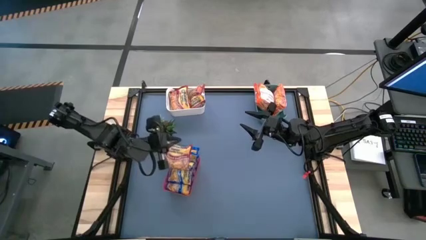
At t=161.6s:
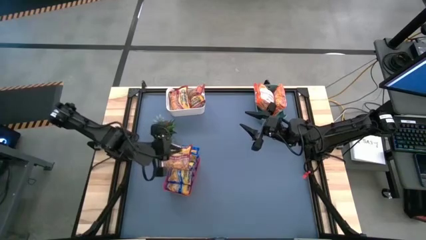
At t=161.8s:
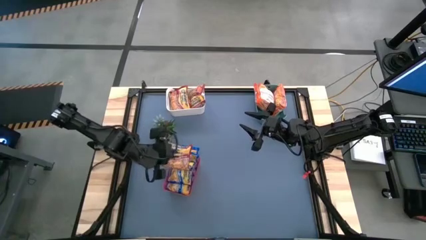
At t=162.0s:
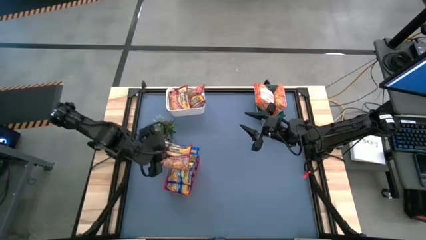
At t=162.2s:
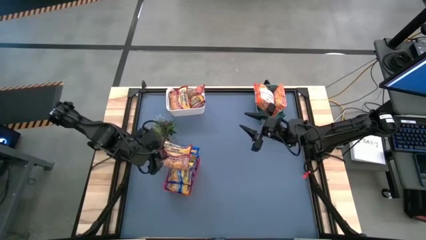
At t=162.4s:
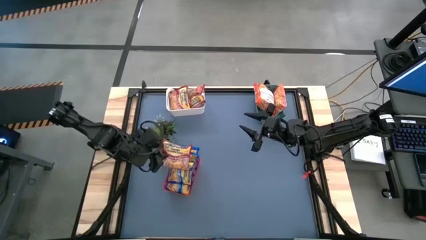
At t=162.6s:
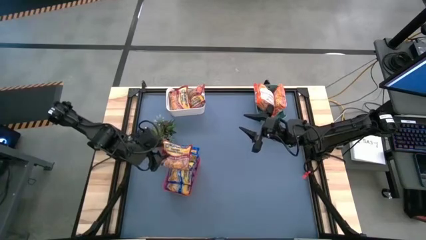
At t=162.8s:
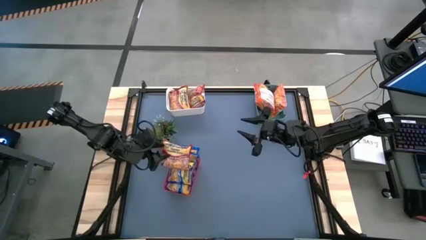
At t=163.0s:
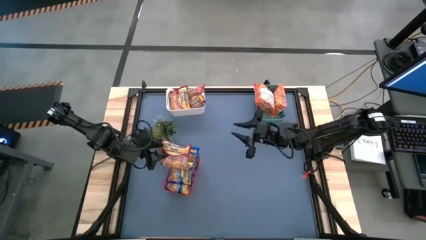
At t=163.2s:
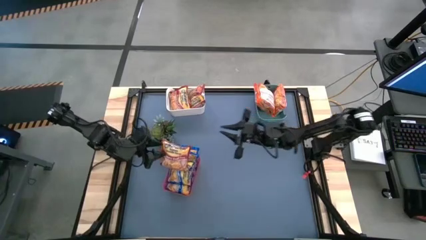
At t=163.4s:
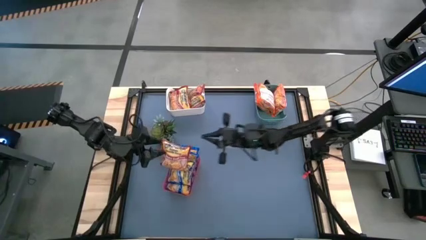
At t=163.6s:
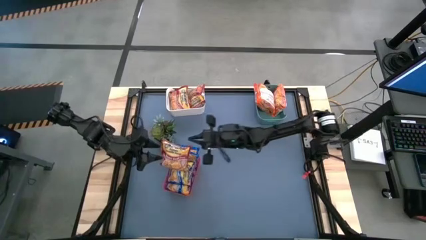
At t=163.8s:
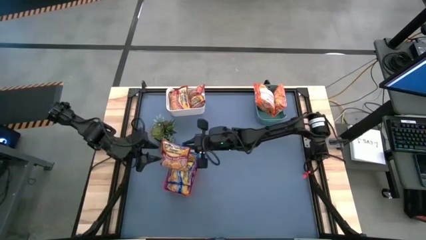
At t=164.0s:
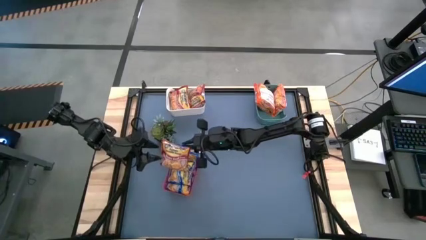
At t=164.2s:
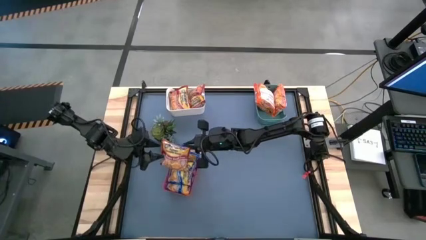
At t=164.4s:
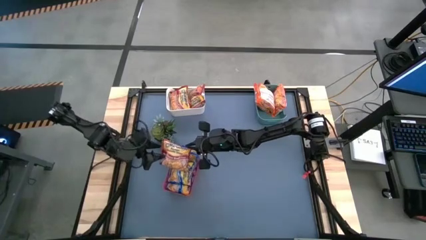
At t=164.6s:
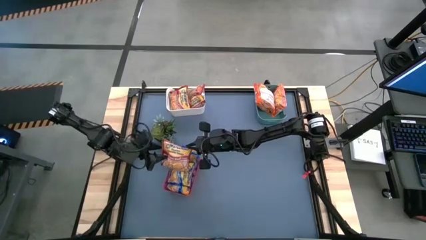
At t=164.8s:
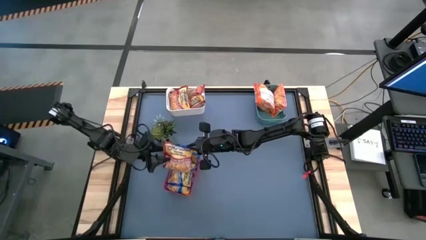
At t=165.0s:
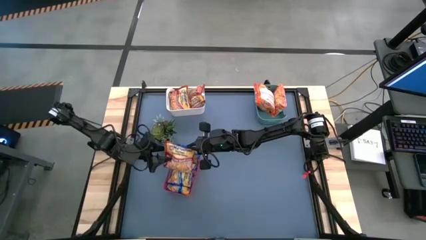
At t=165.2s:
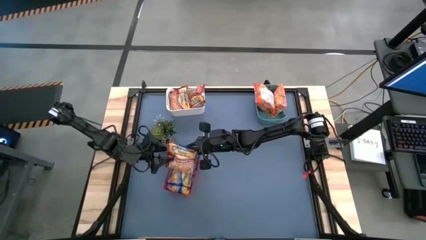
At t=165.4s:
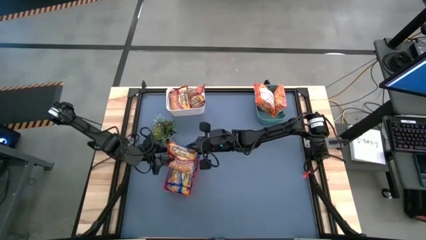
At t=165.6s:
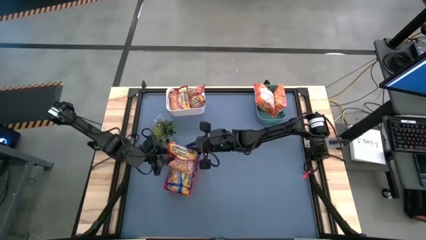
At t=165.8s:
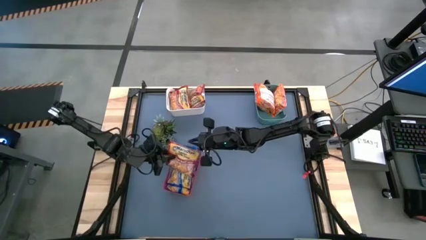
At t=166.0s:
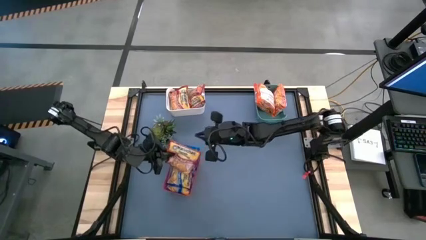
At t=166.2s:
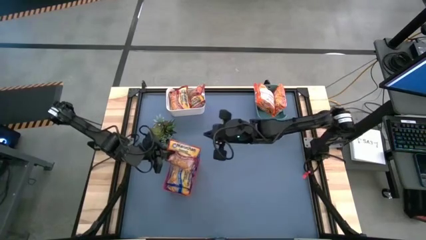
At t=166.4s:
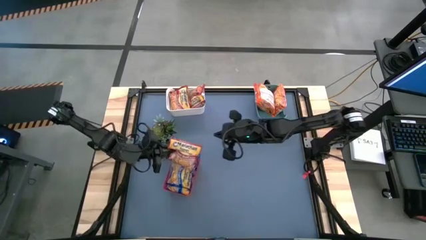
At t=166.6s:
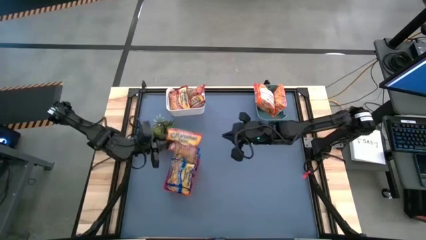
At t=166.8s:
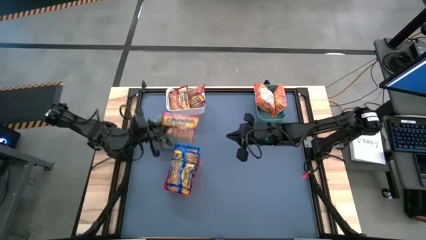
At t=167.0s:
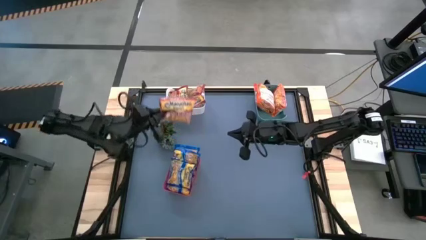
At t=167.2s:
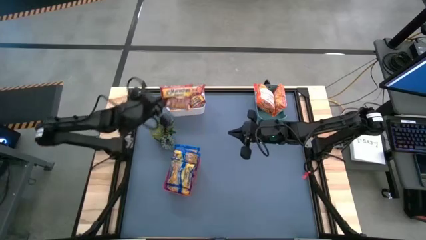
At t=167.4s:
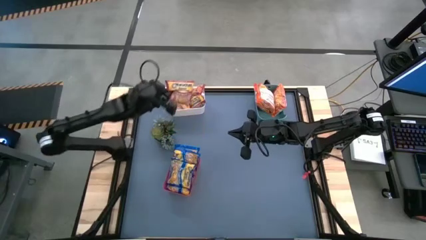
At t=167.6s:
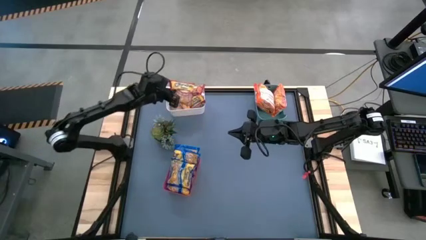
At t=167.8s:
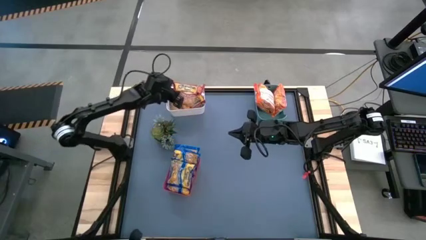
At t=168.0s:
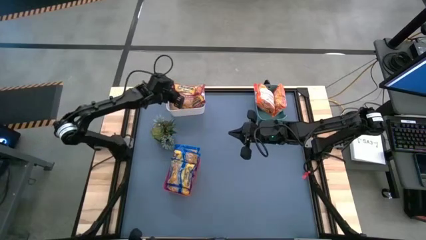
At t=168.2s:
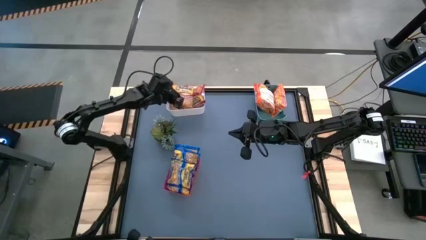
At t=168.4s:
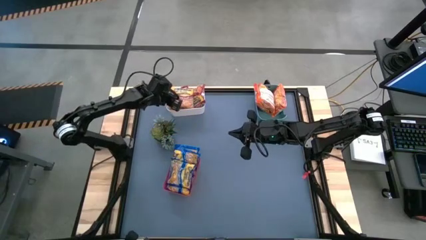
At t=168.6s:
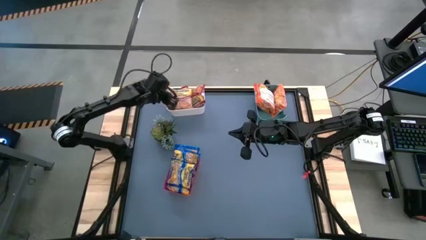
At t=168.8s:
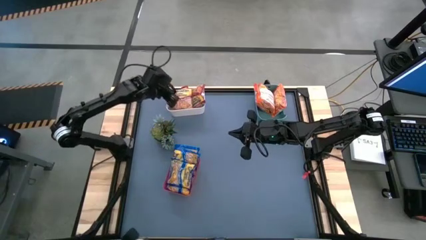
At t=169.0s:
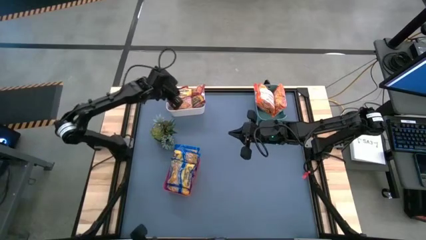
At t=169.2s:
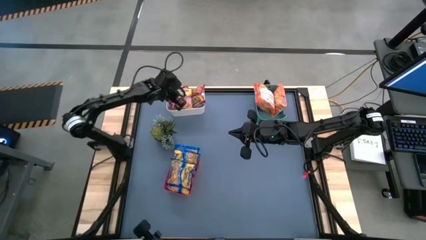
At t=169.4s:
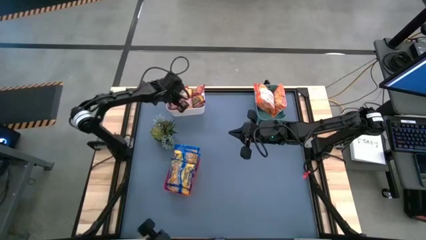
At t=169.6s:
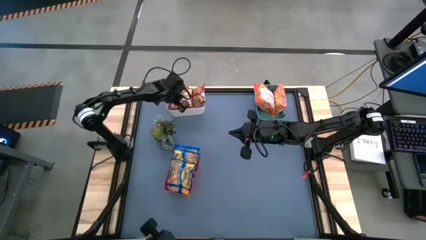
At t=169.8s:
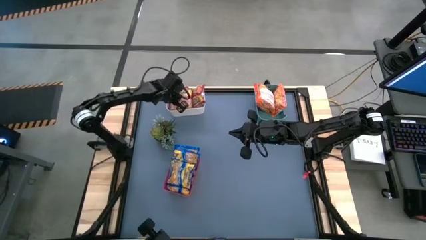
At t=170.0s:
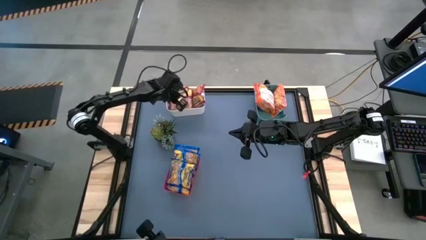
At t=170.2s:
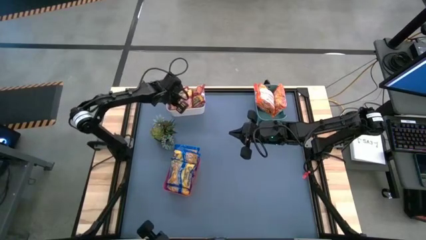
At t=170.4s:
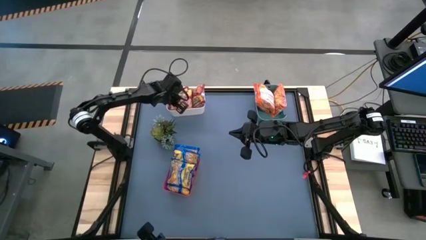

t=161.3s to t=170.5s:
Task: Sort Maruchan noodles
Put the red noodle into the white bin

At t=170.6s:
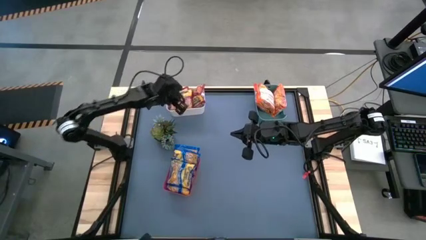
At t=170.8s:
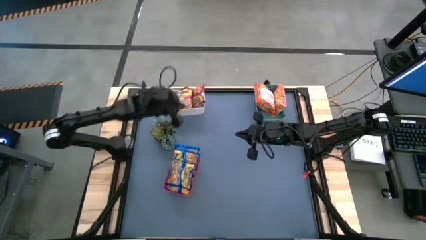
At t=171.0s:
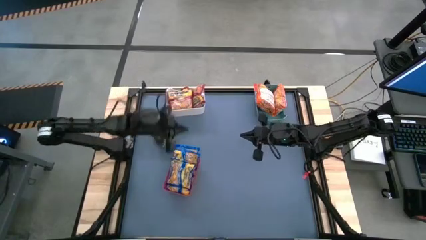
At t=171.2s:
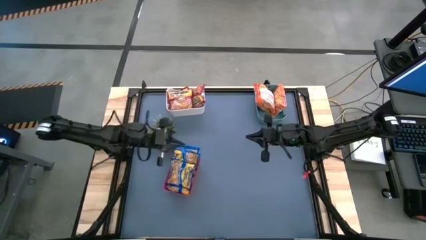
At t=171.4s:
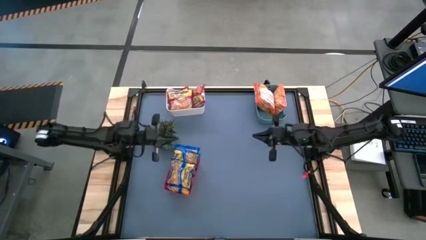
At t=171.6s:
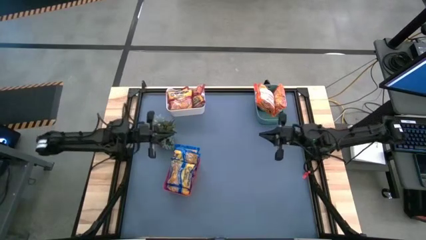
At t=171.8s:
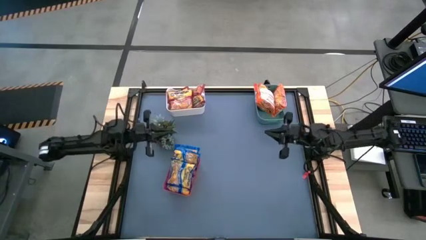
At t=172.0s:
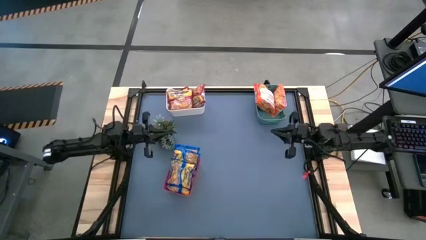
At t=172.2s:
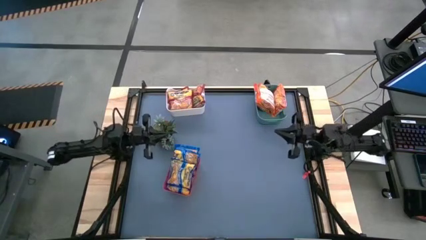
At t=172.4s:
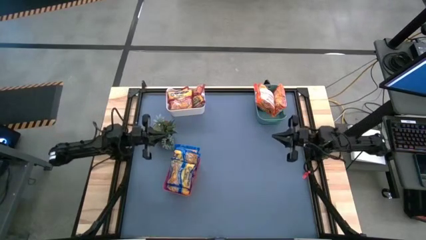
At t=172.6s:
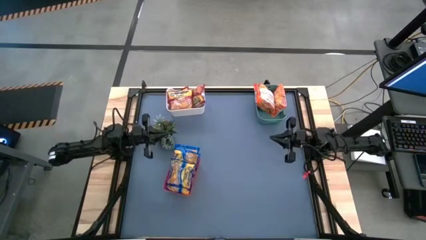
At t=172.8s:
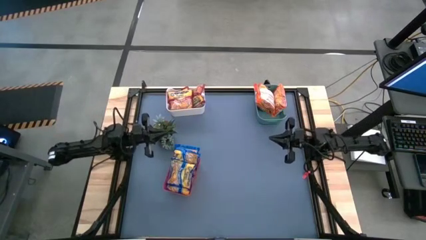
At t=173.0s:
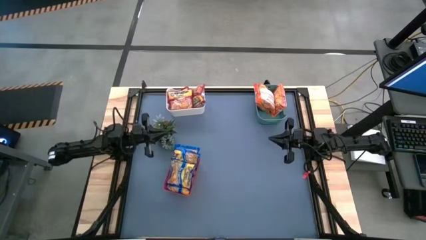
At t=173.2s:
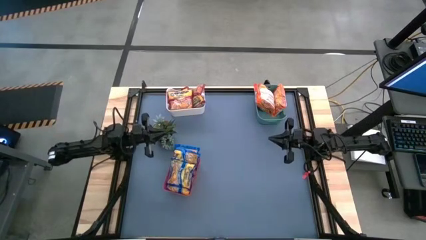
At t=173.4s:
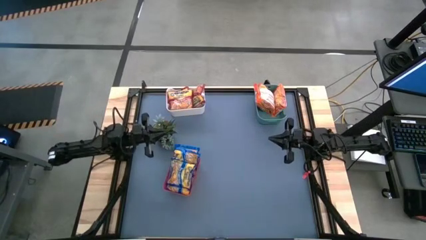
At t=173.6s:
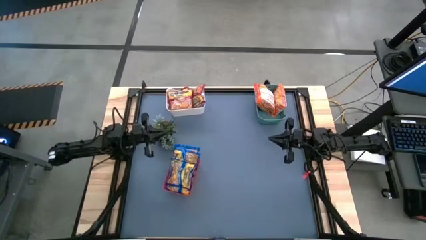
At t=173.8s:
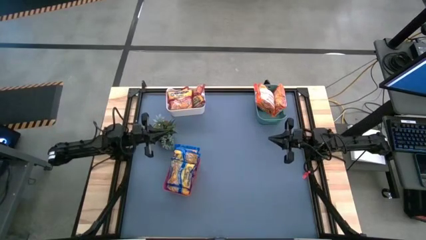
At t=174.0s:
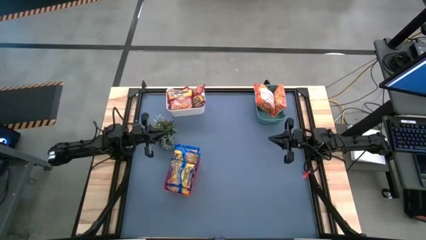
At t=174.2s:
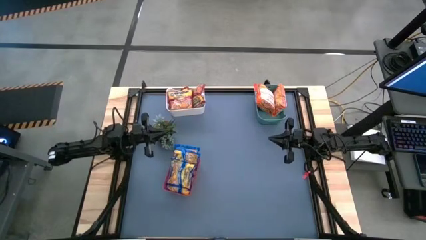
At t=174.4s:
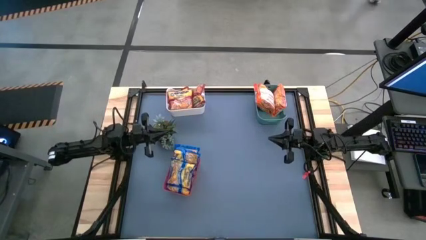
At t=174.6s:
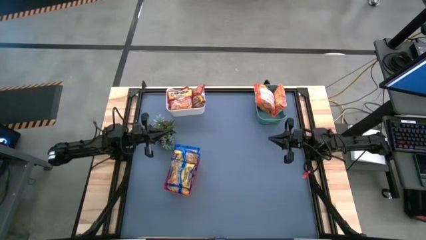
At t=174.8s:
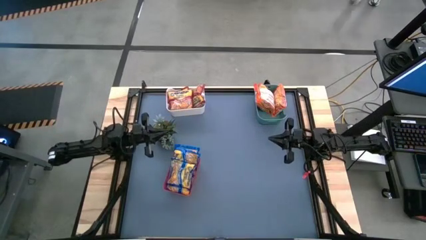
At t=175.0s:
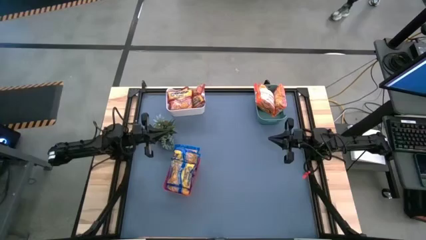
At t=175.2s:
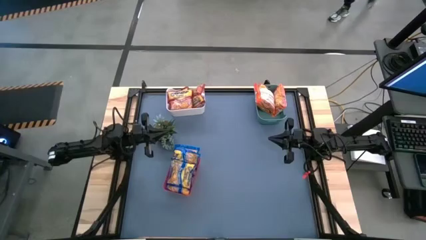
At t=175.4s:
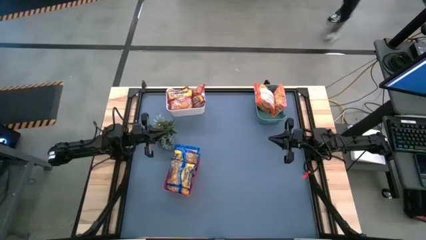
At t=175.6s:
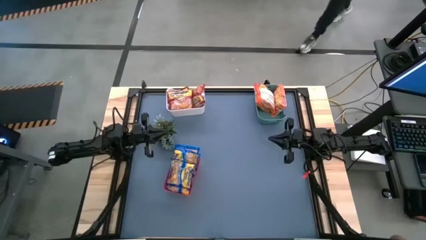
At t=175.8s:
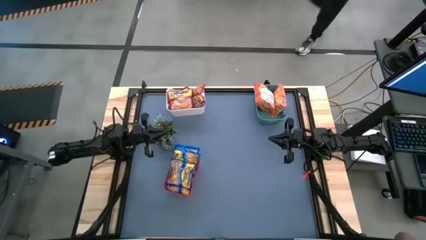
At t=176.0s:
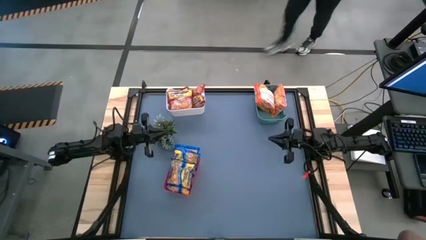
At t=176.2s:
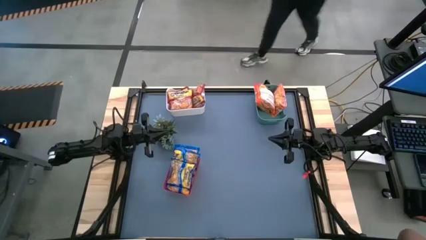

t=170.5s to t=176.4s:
Return to Home Position
